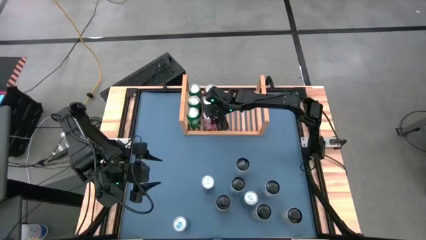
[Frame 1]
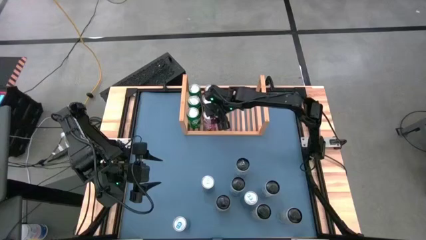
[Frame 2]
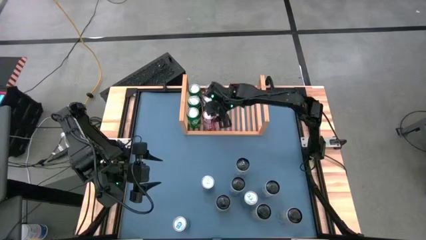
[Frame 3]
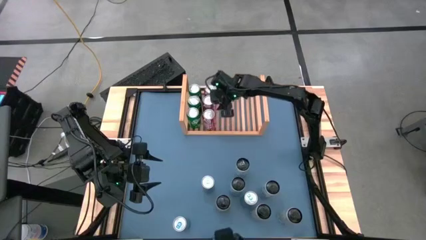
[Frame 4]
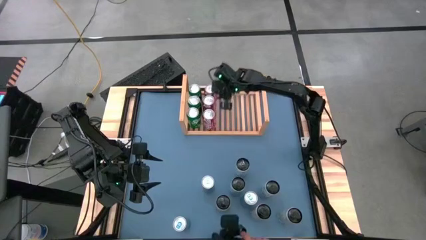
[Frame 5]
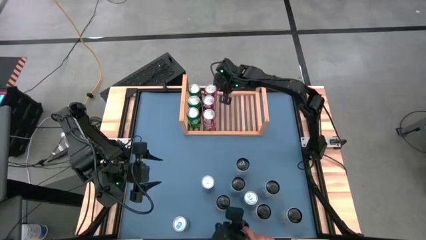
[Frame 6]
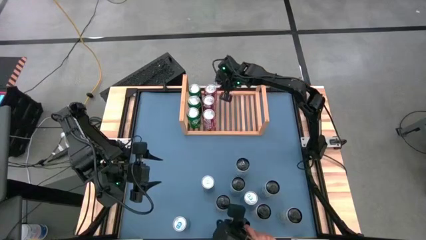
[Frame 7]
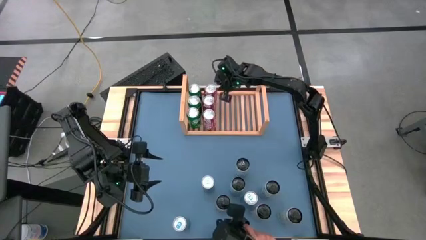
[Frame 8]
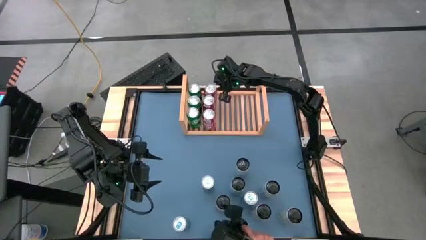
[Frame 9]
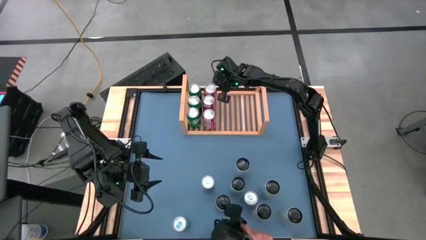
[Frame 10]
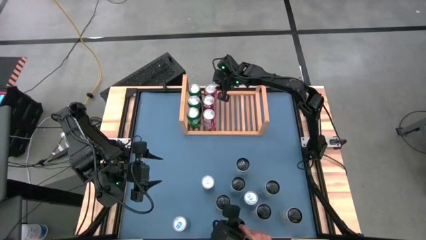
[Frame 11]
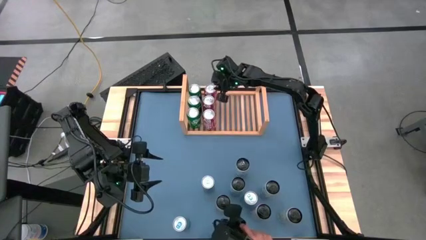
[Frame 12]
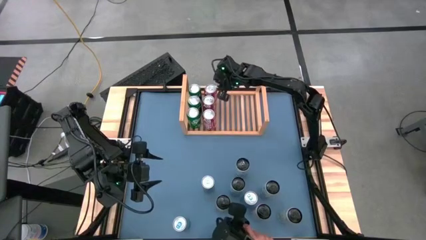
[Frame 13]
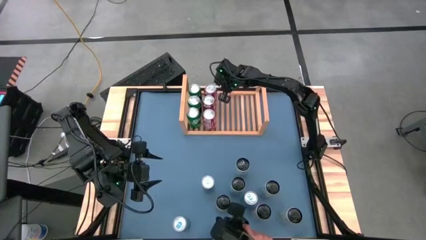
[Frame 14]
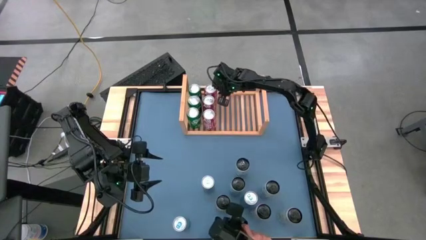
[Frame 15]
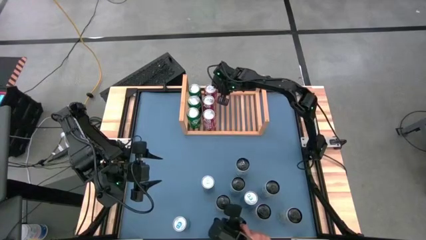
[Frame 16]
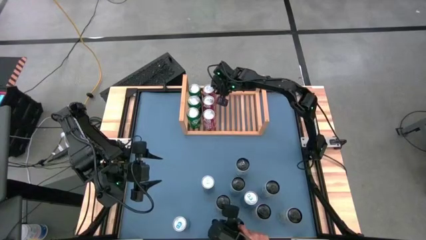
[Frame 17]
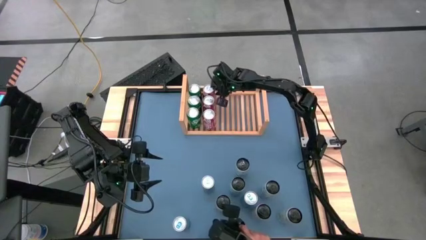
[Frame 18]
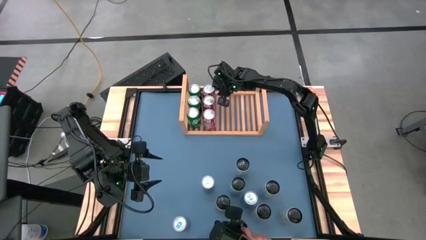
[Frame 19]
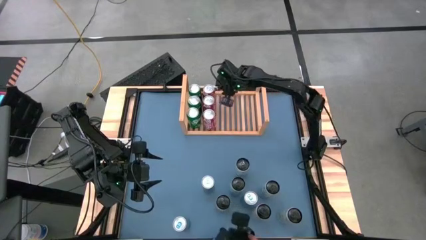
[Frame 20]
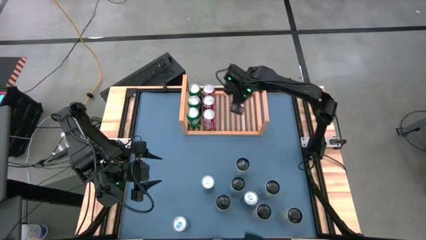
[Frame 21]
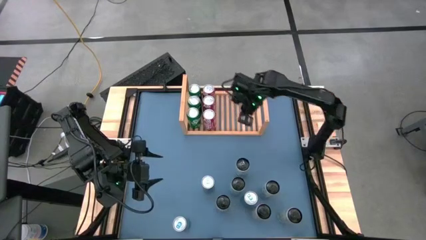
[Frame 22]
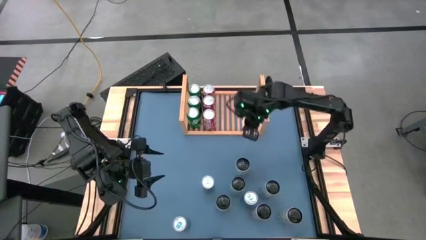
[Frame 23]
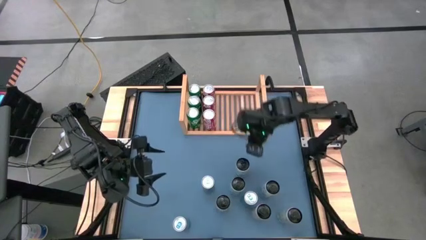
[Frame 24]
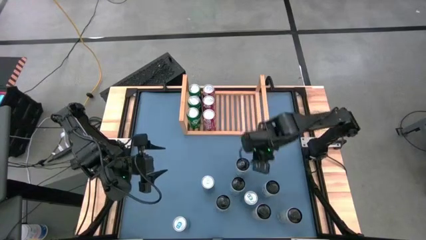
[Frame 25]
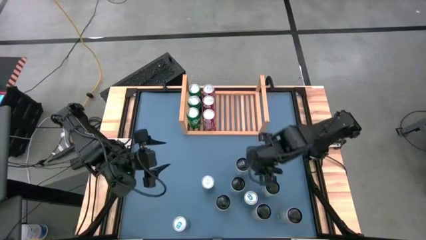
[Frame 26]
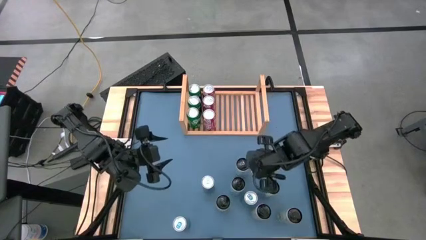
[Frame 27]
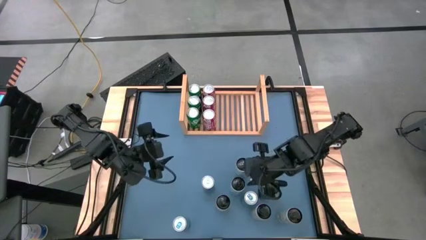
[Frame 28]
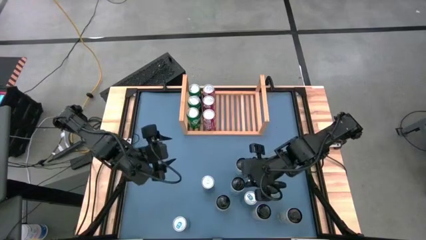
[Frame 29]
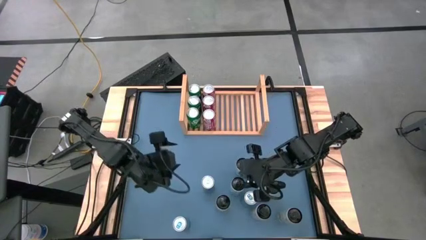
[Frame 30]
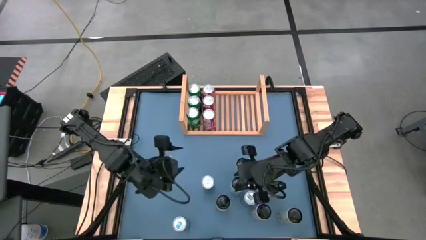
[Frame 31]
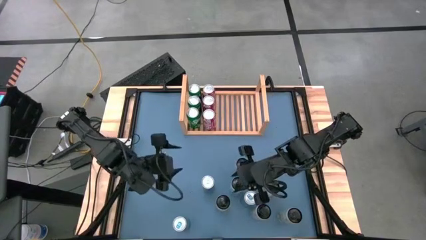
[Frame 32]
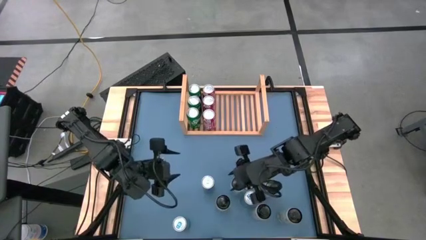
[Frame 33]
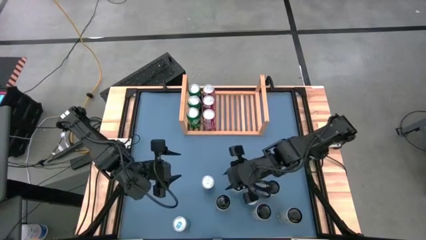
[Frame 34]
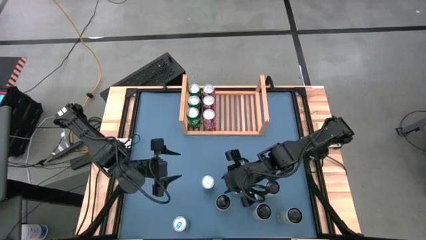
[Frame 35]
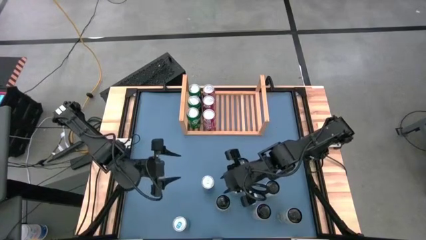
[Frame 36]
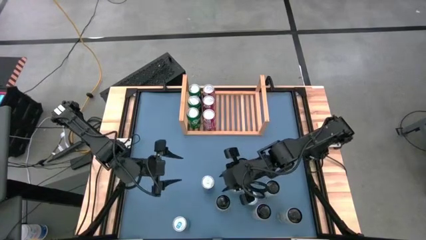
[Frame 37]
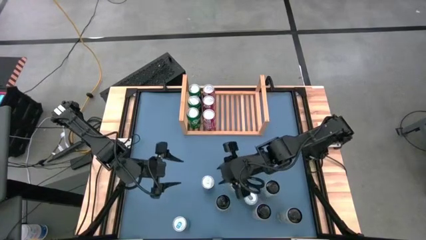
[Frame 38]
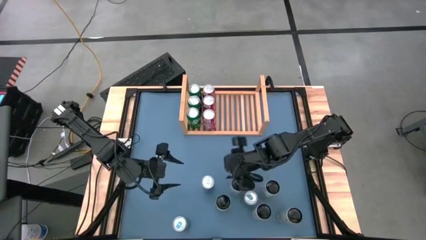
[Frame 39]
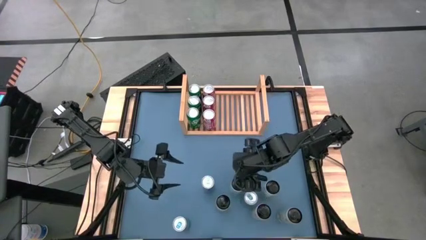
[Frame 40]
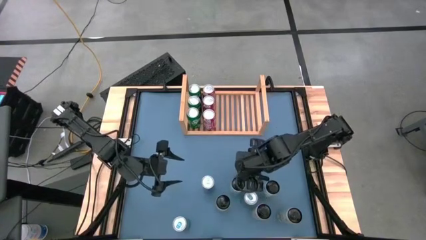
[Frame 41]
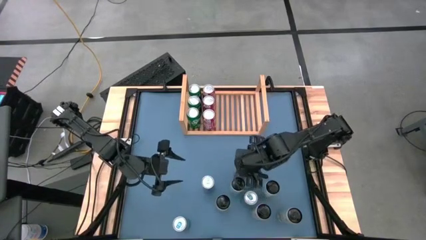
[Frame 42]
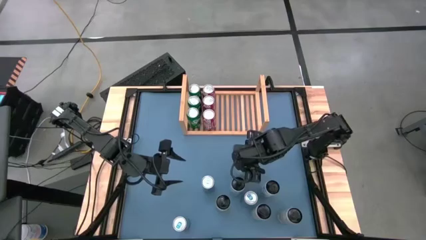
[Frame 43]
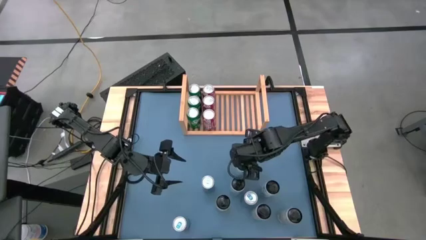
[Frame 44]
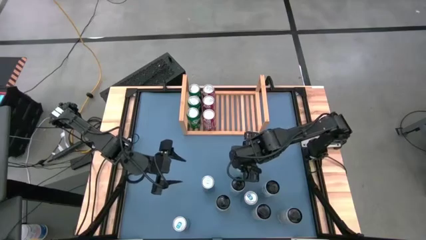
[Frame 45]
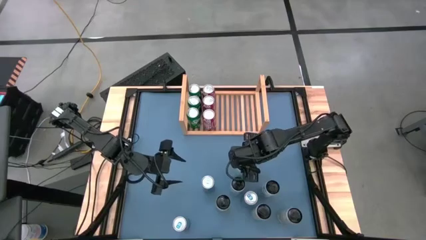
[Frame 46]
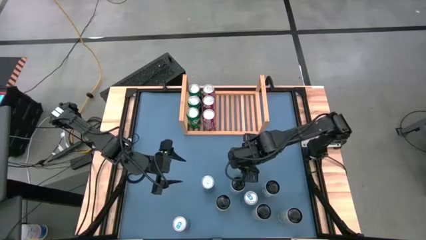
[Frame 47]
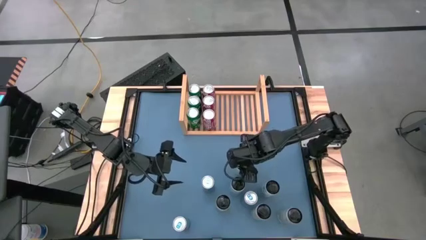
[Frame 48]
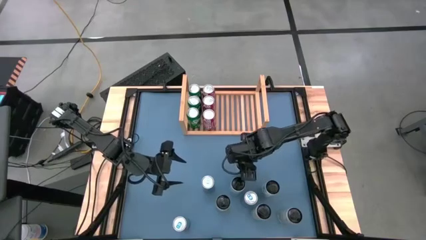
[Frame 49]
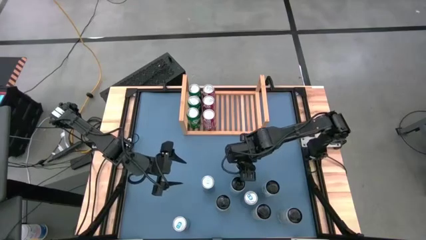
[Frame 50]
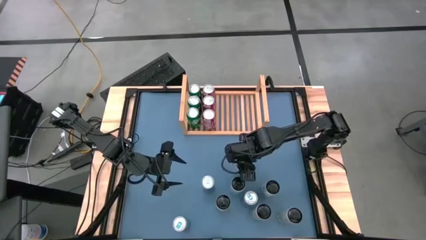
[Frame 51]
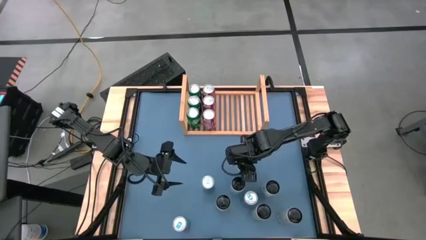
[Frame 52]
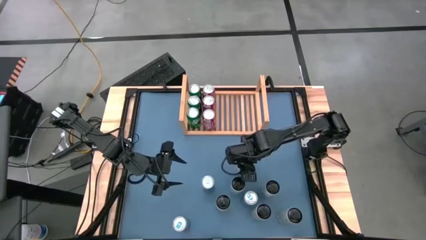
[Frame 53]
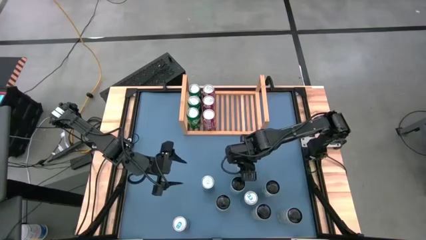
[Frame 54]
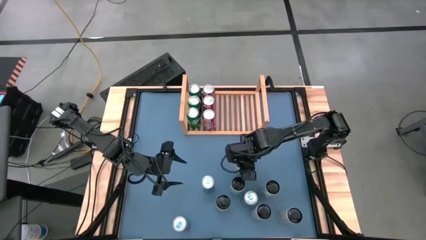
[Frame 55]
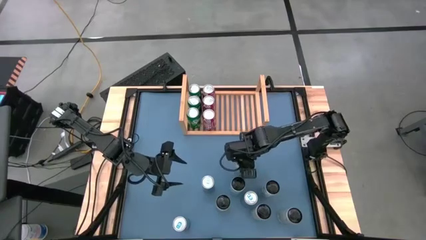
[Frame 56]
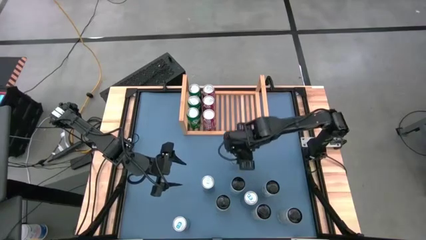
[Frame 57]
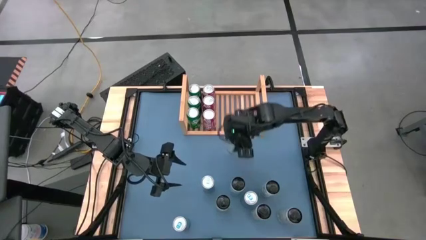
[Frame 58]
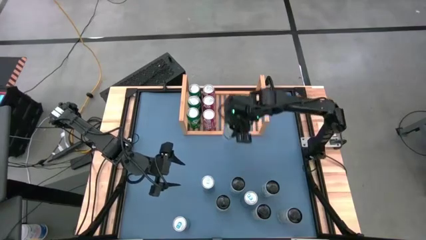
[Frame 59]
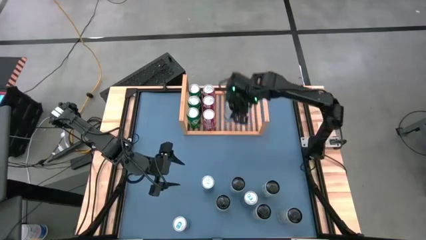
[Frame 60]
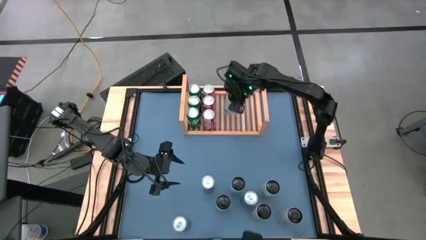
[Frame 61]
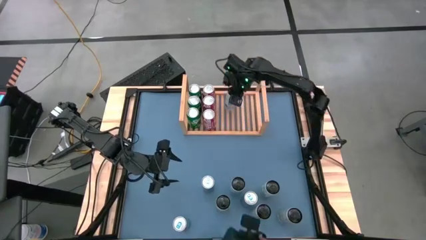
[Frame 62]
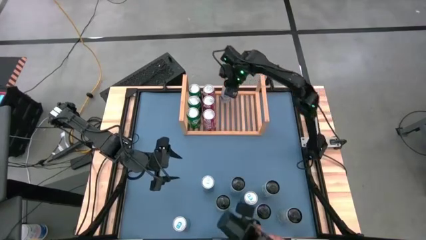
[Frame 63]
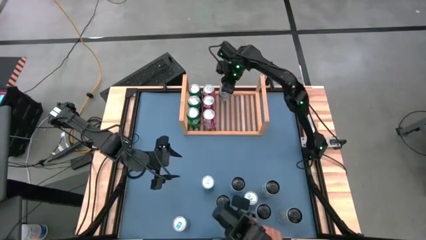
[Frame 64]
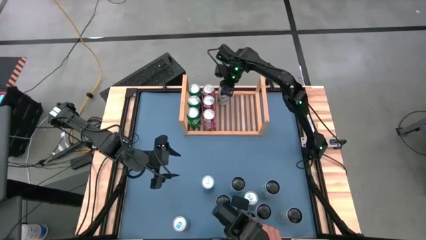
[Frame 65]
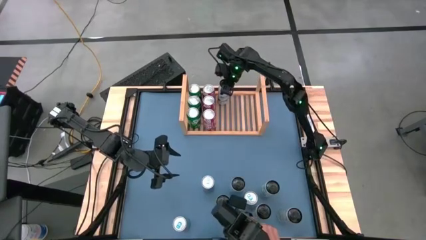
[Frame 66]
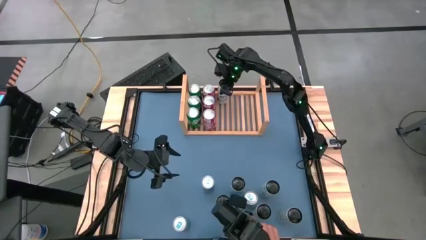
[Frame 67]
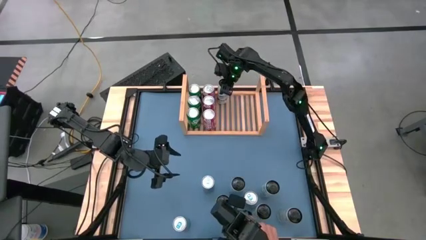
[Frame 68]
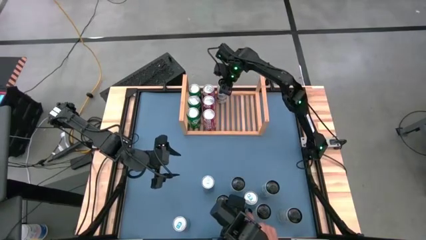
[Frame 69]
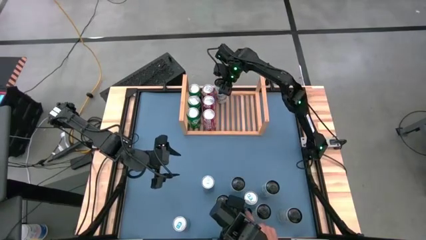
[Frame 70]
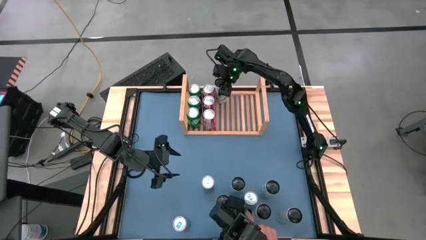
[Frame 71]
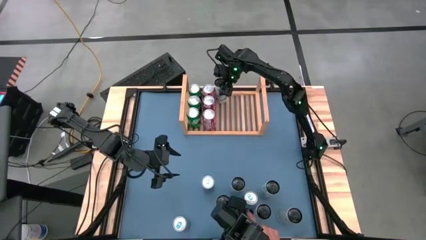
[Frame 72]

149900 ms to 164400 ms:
Task: Place canned beverage on shelf
Put the top right white-blue soda can on the shelf

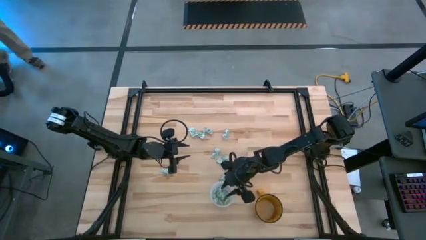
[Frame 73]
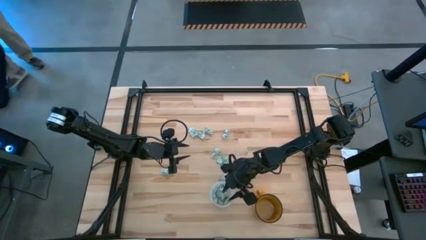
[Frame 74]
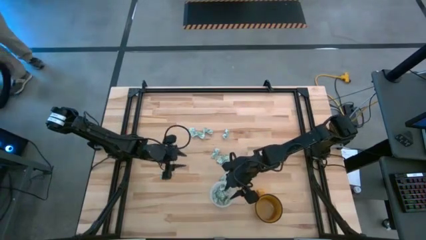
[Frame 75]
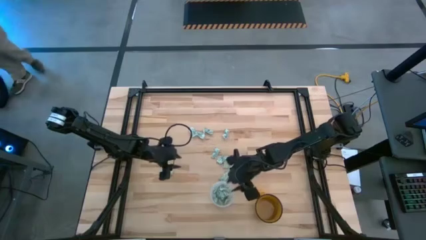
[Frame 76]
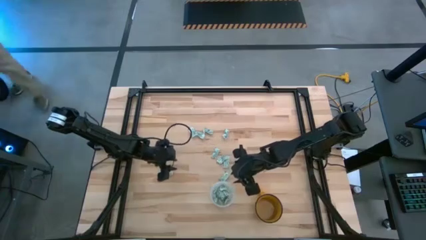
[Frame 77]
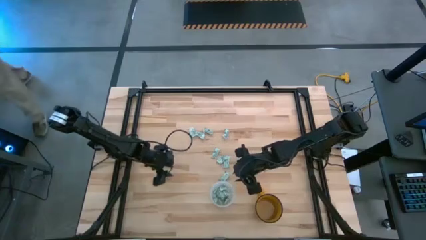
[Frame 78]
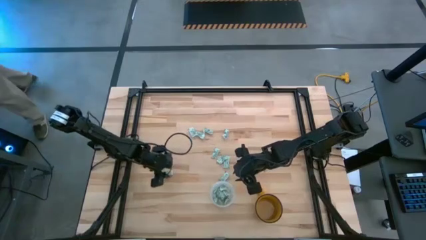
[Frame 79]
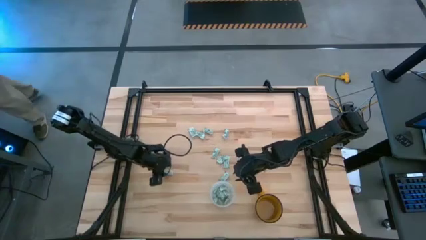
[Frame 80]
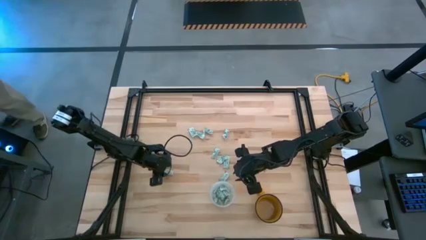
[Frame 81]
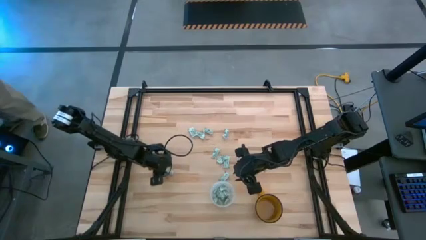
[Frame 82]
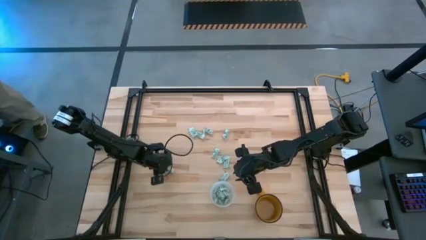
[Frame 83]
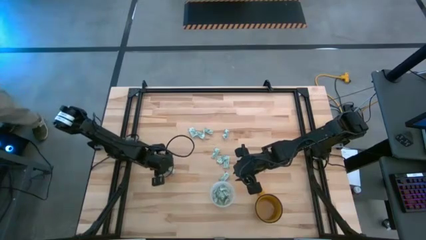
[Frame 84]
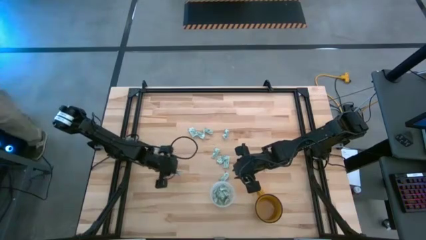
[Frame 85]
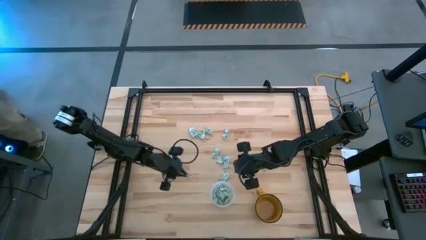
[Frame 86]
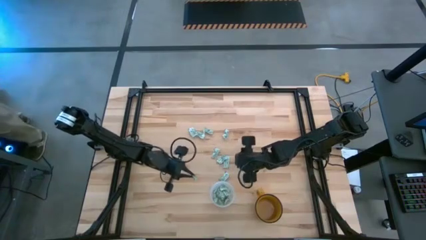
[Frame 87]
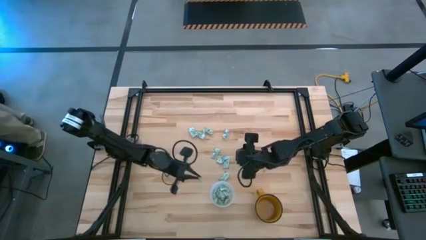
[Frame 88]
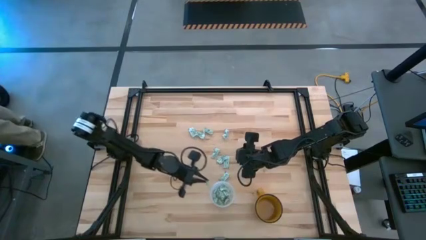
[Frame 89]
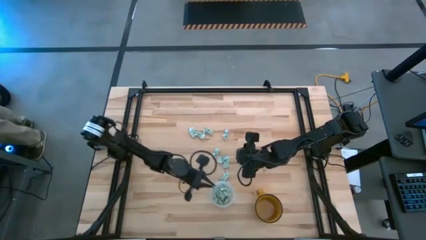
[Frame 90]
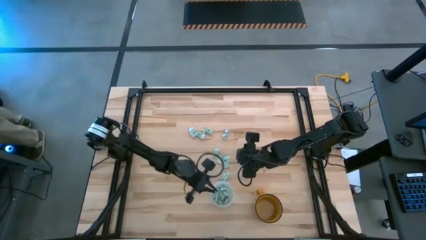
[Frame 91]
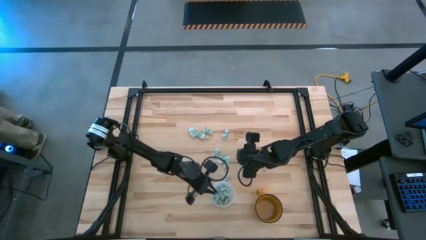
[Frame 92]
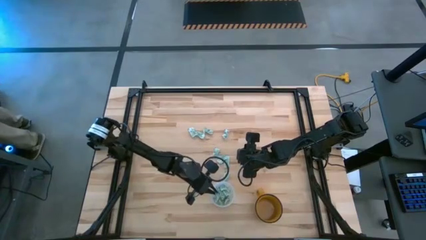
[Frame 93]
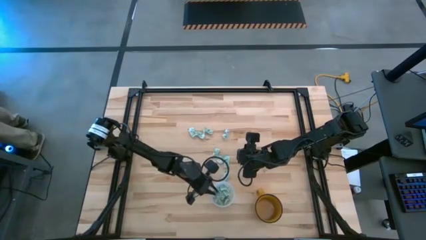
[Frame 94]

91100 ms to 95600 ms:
Task: Pick and place Stevia / Truvia into bins
Put the stevia packet into the transparent bin
